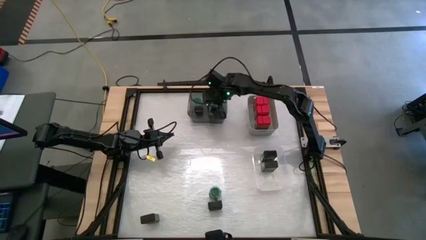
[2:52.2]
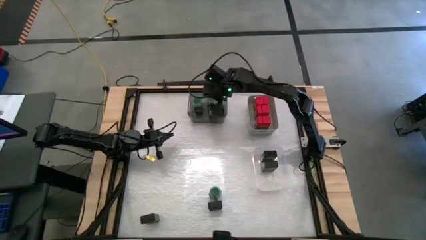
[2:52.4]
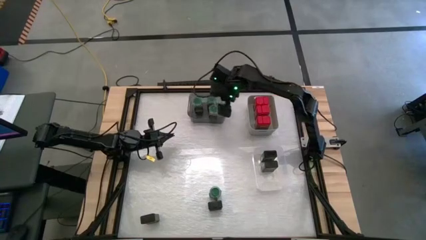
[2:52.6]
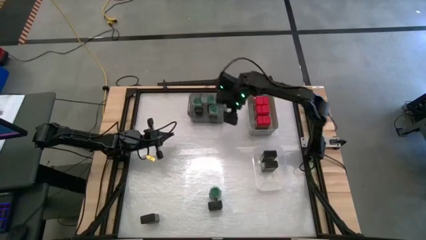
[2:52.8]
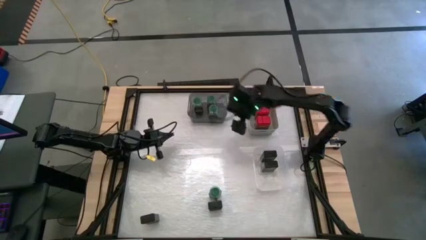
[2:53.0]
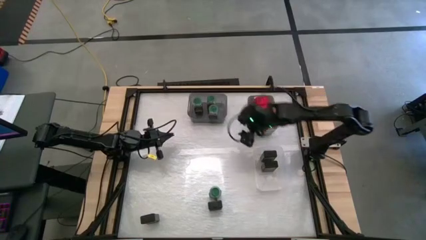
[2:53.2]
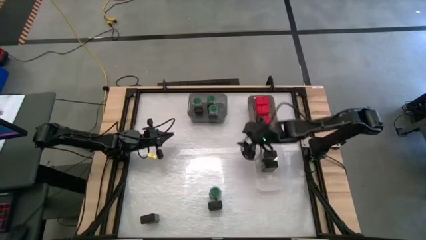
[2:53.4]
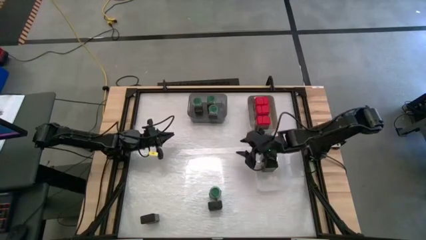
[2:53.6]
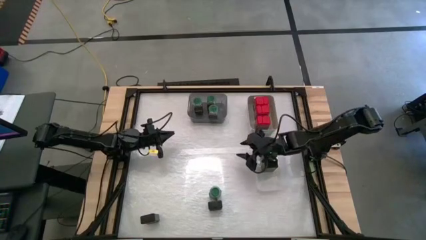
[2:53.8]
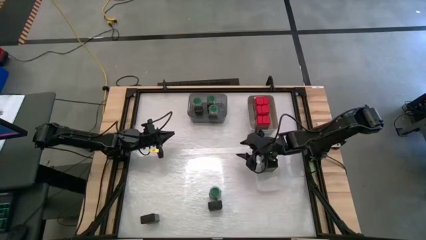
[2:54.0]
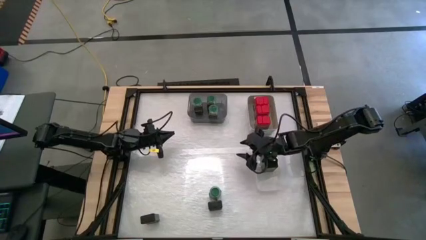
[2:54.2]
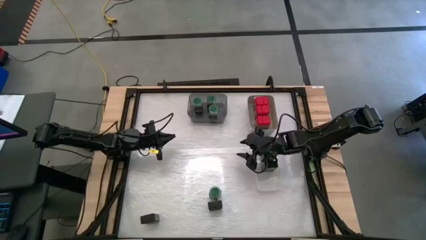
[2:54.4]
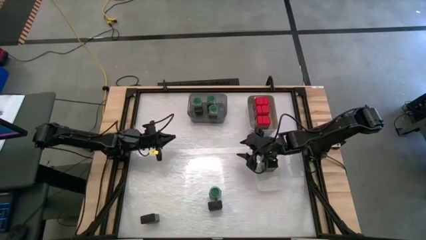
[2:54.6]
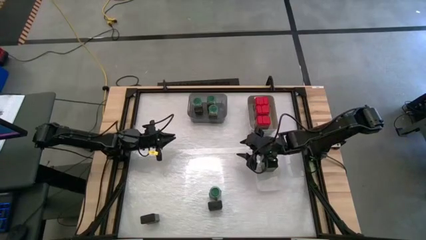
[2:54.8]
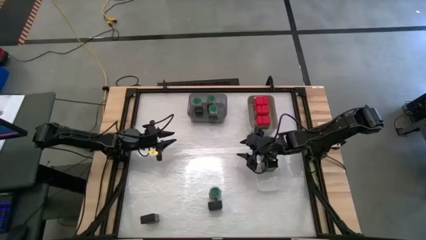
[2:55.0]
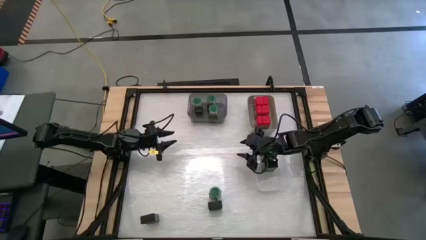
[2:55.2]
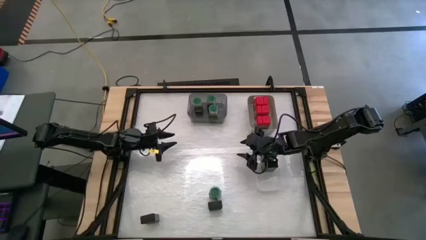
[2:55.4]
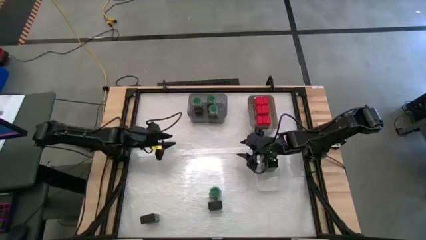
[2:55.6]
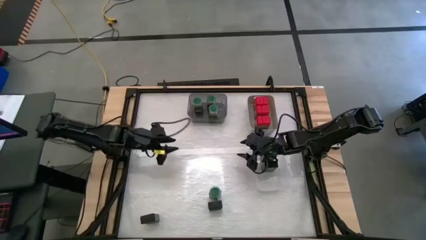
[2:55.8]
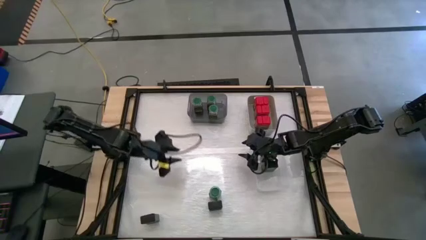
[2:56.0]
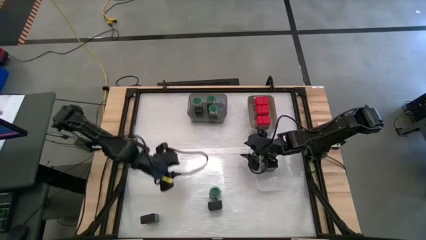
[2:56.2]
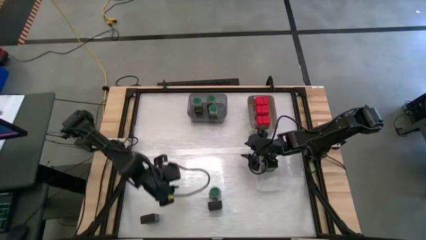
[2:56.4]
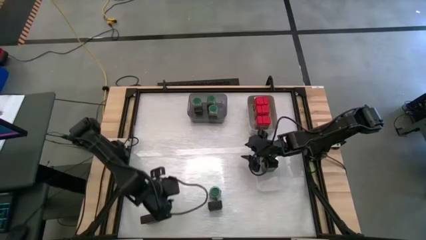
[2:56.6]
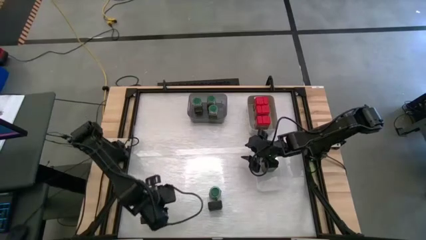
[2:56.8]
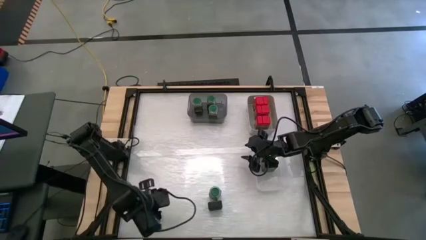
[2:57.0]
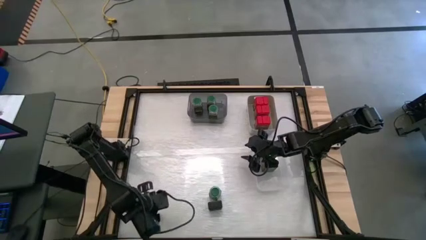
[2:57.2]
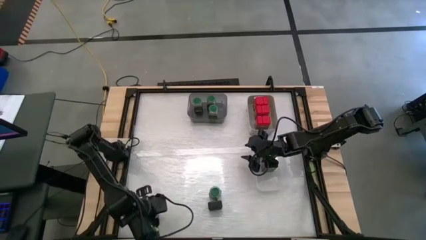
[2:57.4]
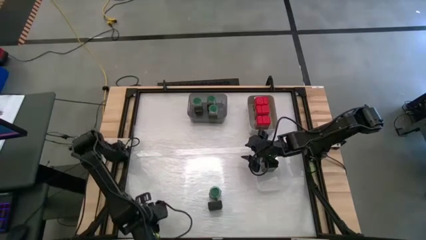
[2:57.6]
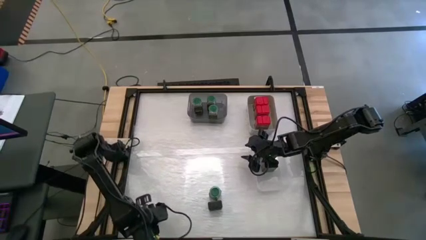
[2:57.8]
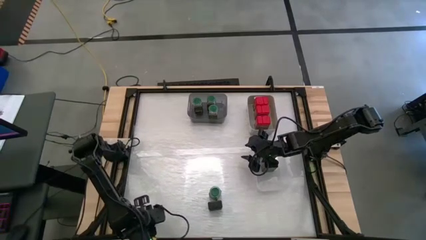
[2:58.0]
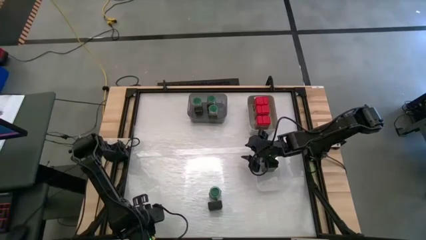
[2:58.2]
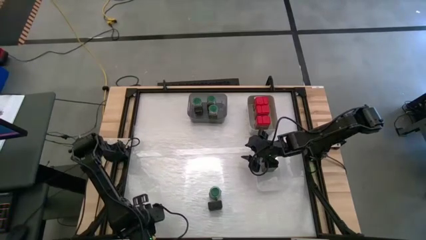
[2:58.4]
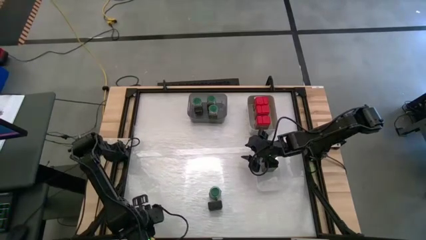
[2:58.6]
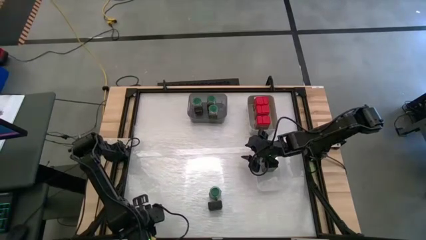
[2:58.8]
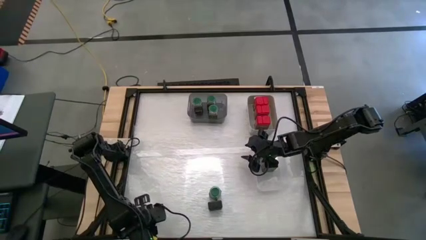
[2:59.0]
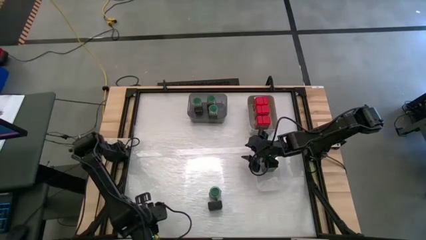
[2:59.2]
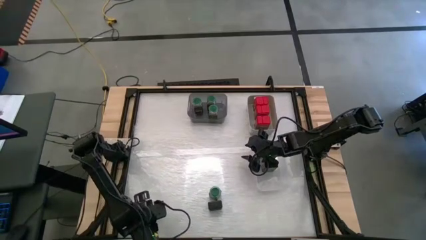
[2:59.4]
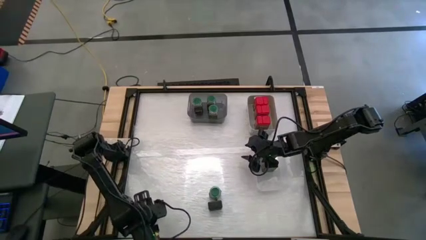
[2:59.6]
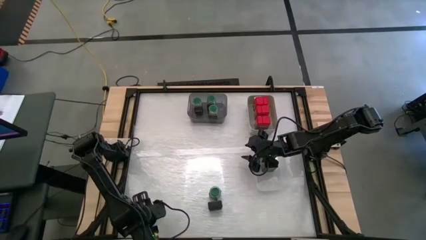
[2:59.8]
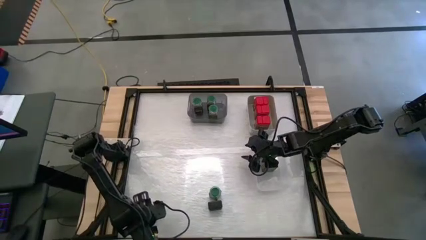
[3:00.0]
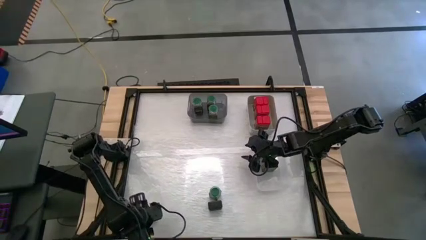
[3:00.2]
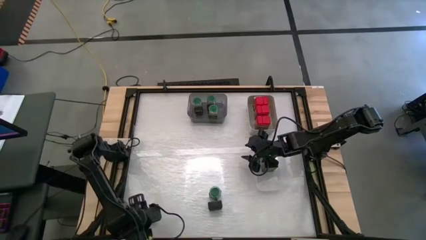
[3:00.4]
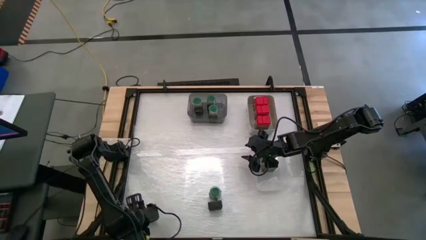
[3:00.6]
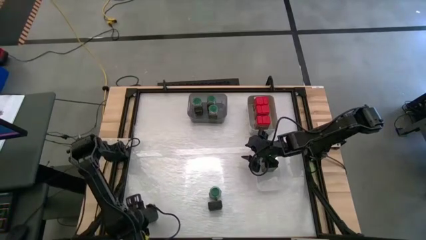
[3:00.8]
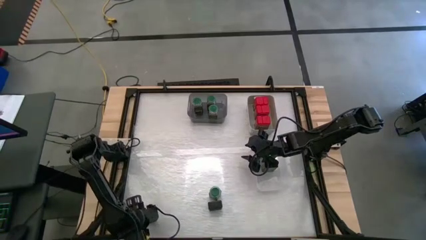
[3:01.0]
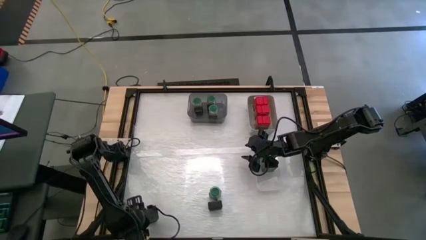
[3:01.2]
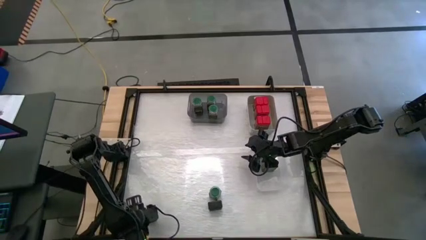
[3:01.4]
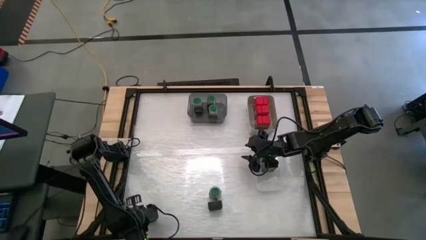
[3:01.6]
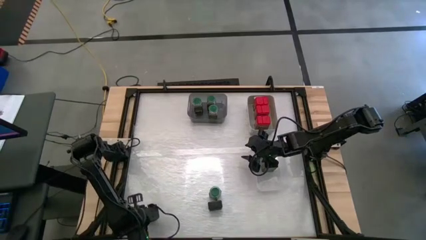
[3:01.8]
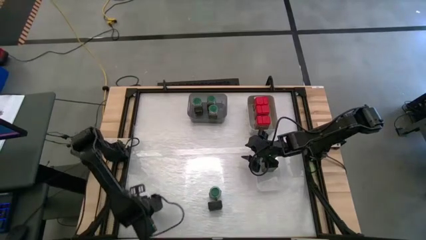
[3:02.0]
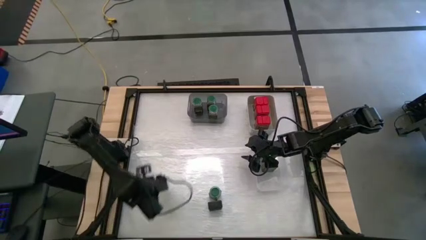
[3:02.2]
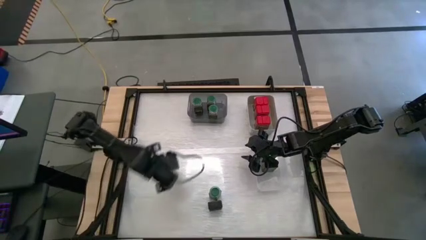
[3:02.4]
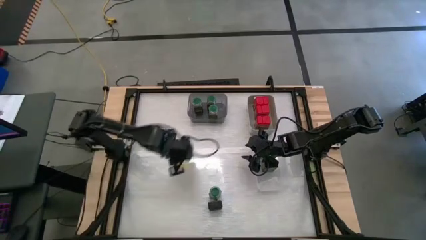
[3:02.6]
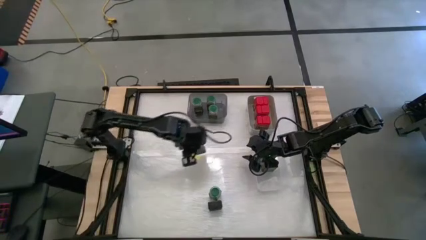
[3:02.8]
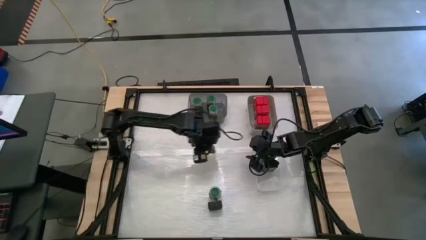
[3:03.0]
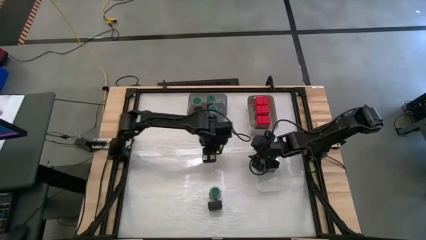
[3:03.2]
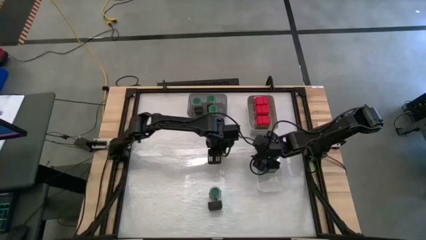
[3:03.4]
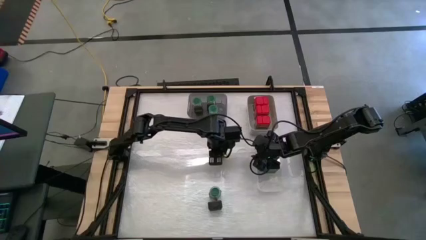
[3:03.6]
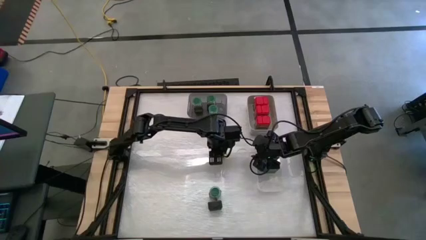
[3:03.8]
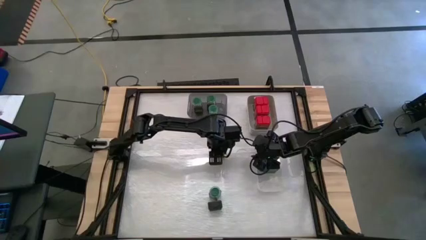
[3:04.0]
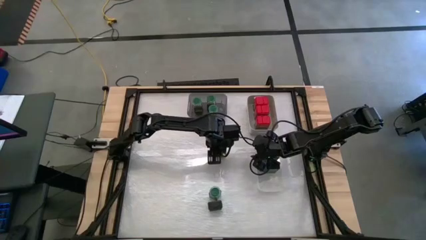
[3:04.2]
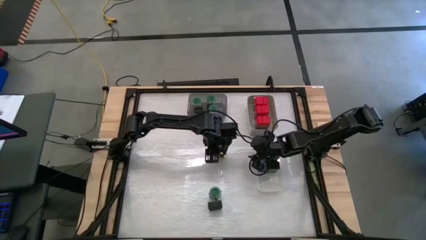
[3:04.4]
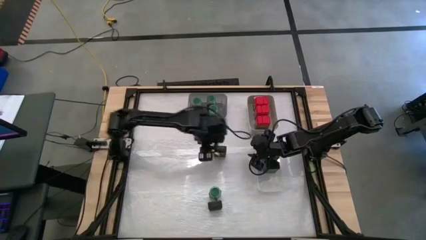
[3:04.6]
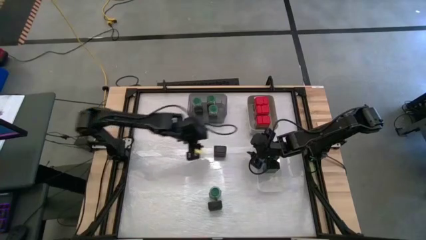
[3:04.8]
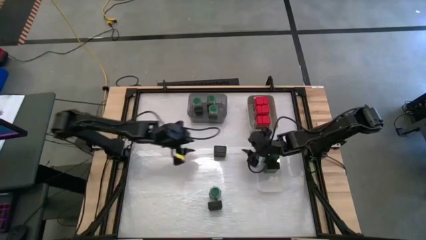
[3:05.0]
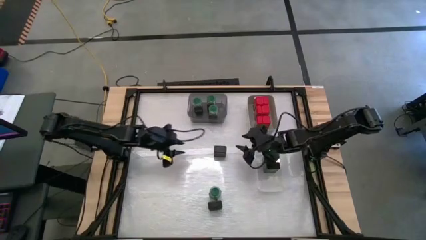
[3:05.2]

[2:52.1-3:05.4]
Task: Sort spices by type
Move the bottom left black seasoning can to the center of the table
